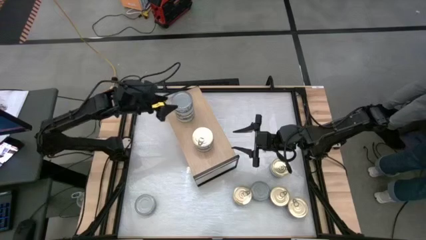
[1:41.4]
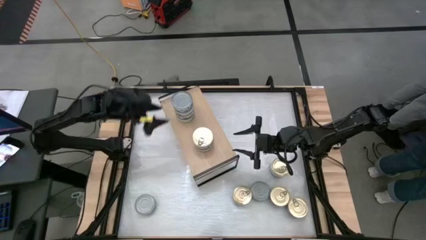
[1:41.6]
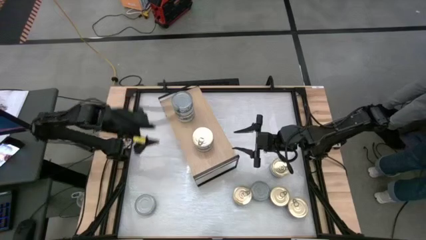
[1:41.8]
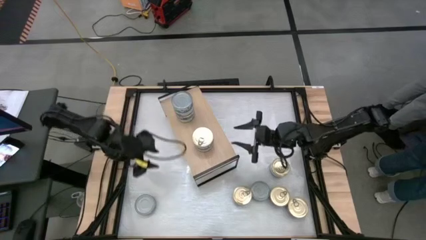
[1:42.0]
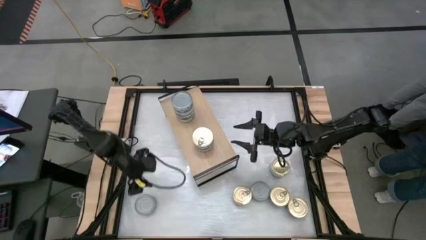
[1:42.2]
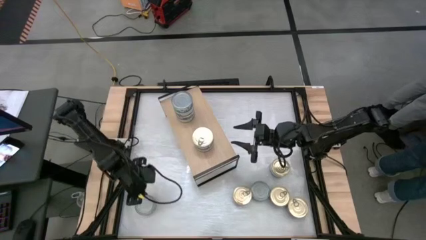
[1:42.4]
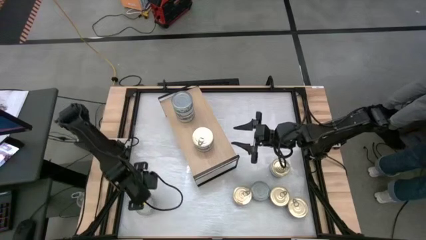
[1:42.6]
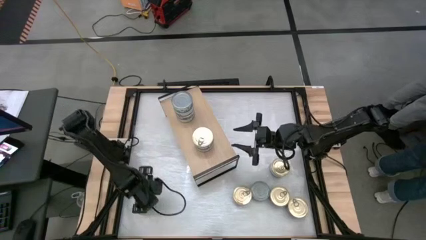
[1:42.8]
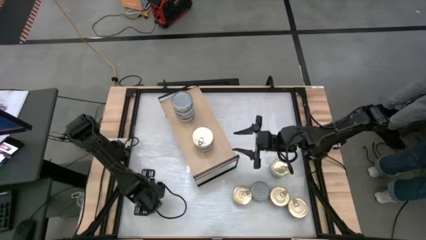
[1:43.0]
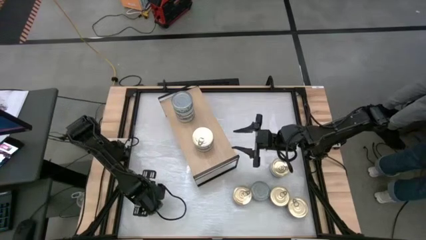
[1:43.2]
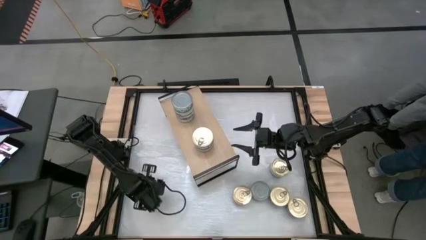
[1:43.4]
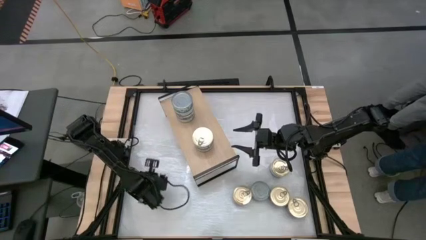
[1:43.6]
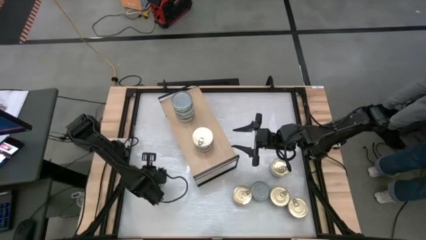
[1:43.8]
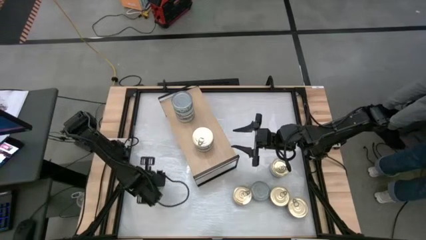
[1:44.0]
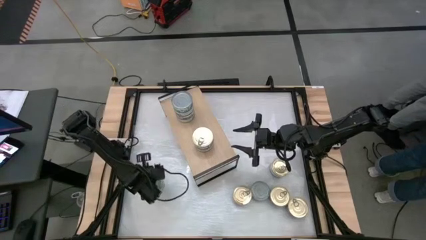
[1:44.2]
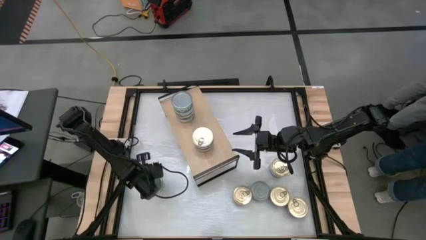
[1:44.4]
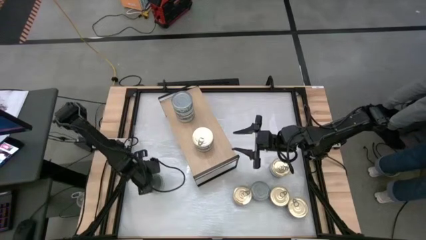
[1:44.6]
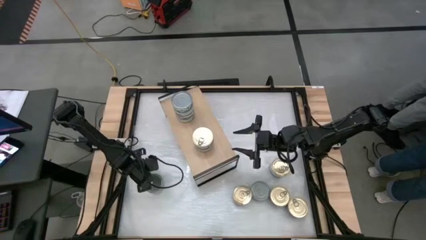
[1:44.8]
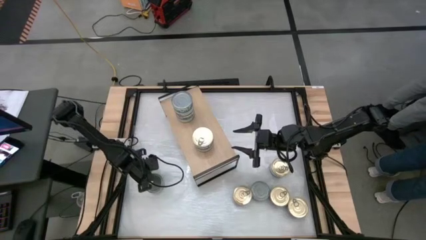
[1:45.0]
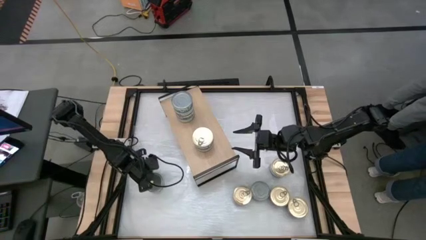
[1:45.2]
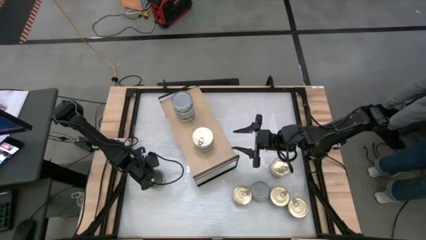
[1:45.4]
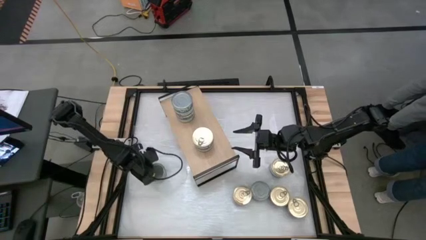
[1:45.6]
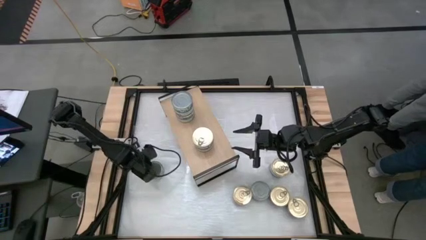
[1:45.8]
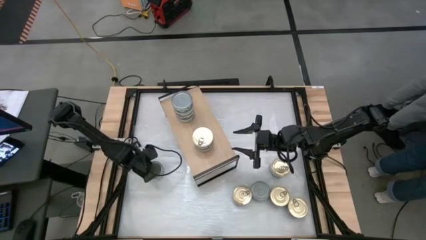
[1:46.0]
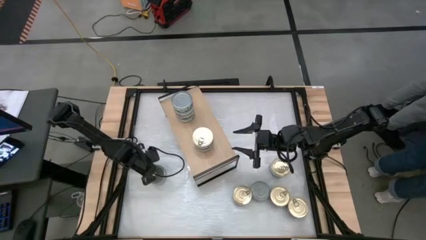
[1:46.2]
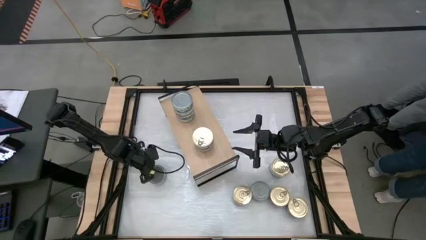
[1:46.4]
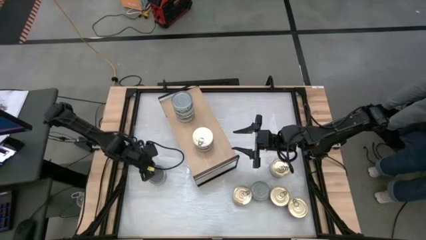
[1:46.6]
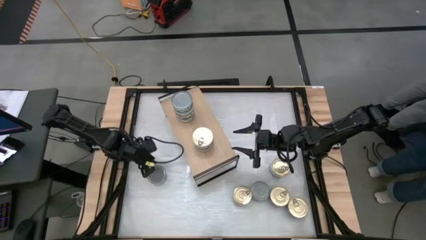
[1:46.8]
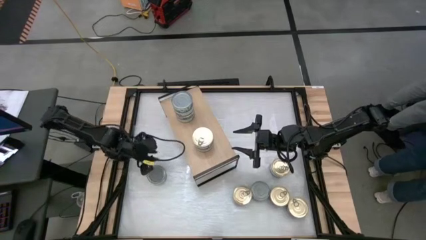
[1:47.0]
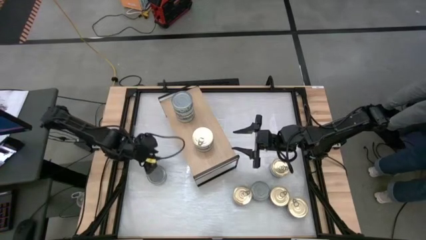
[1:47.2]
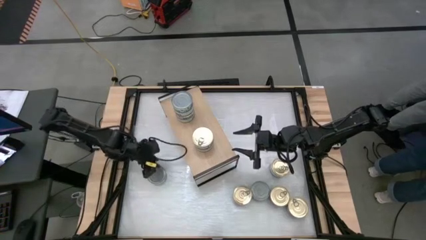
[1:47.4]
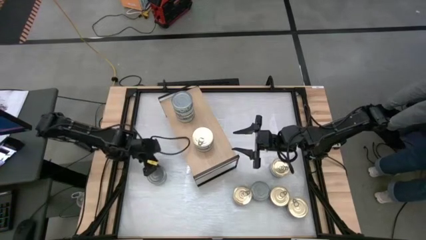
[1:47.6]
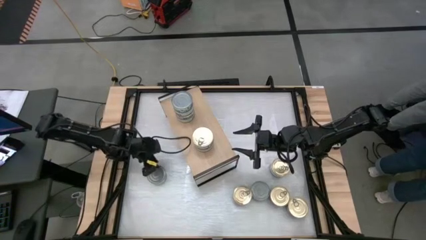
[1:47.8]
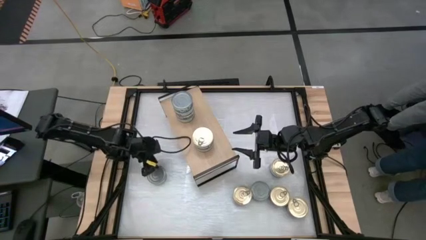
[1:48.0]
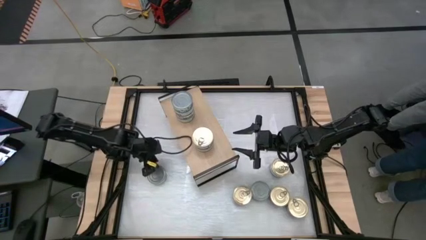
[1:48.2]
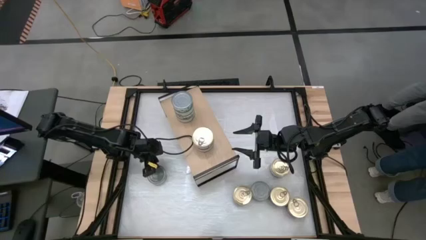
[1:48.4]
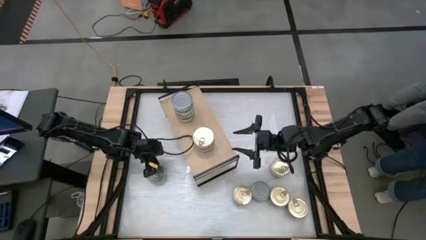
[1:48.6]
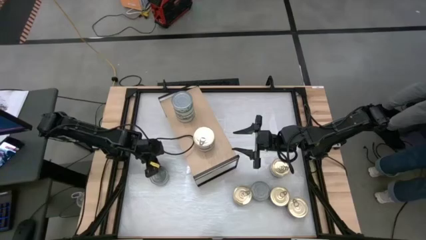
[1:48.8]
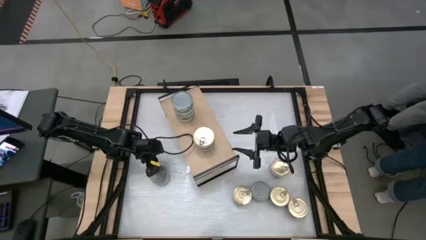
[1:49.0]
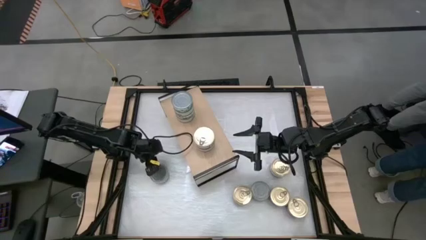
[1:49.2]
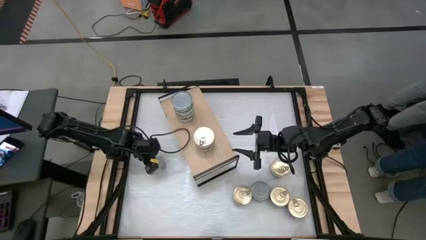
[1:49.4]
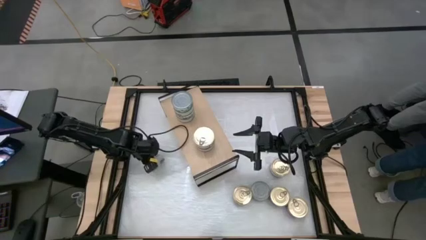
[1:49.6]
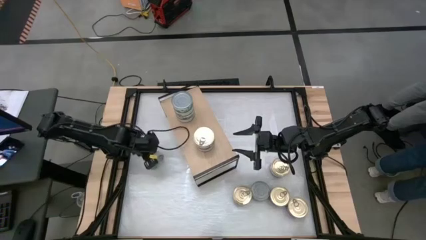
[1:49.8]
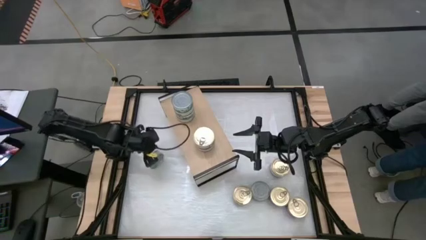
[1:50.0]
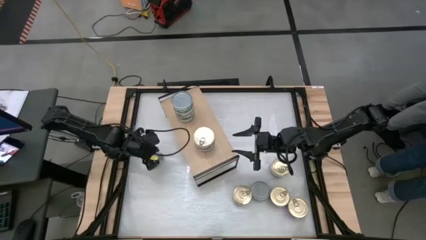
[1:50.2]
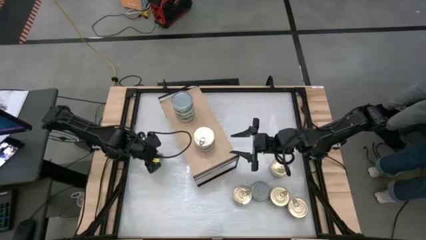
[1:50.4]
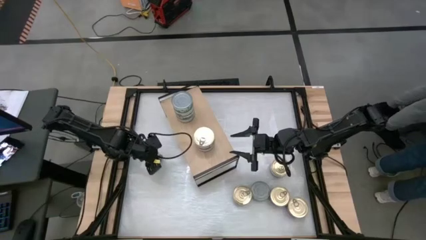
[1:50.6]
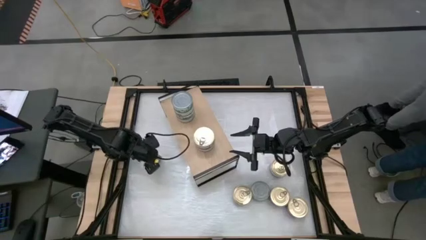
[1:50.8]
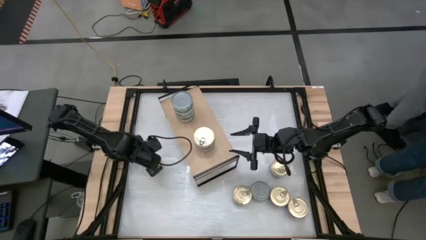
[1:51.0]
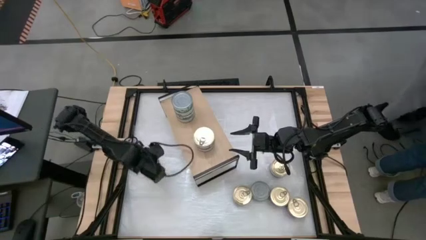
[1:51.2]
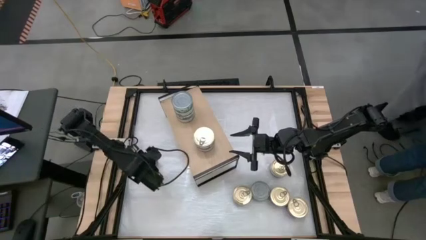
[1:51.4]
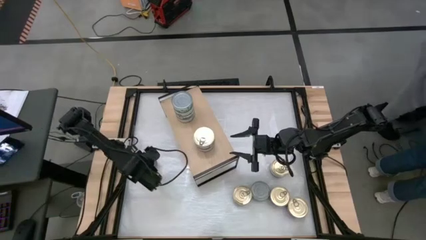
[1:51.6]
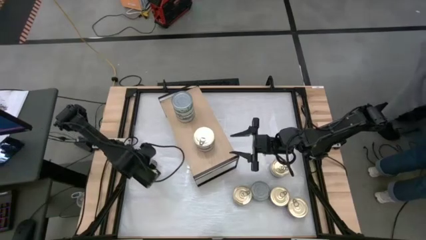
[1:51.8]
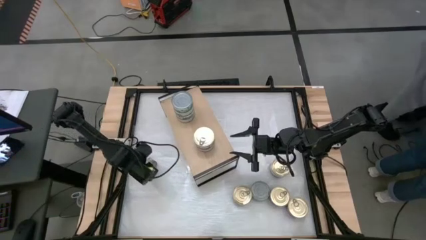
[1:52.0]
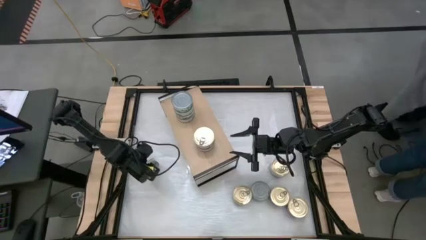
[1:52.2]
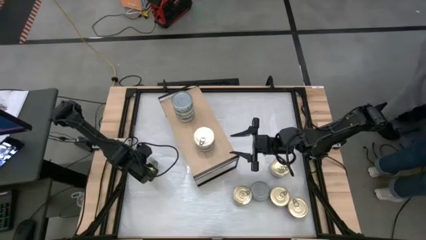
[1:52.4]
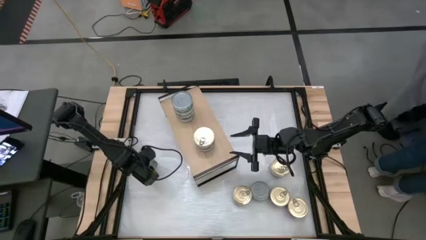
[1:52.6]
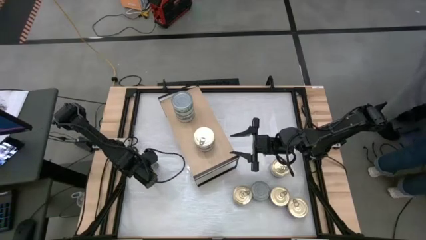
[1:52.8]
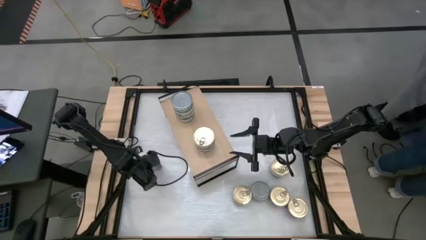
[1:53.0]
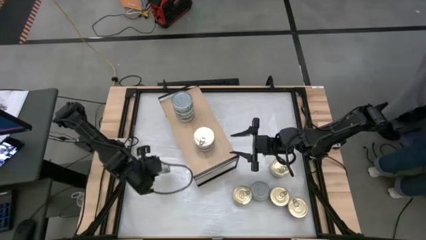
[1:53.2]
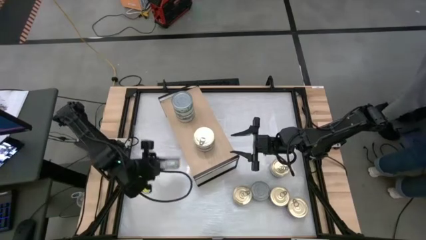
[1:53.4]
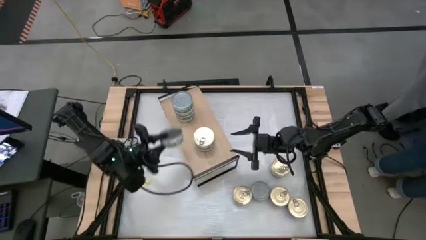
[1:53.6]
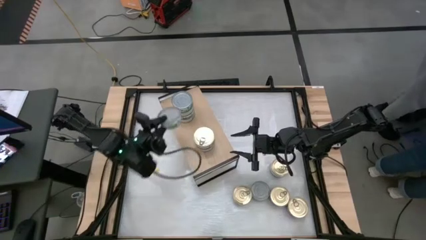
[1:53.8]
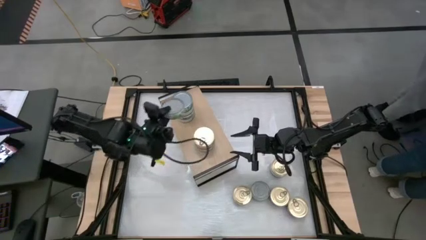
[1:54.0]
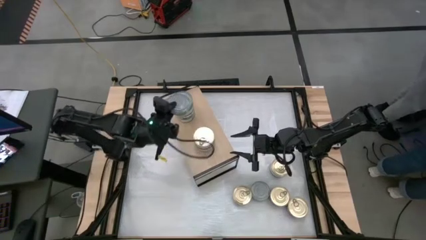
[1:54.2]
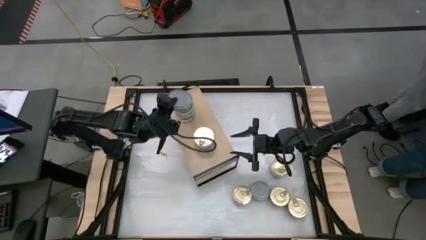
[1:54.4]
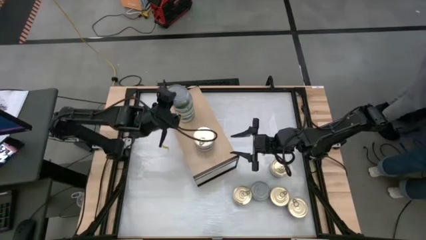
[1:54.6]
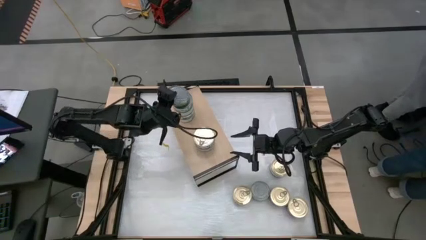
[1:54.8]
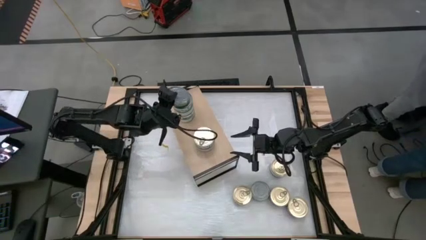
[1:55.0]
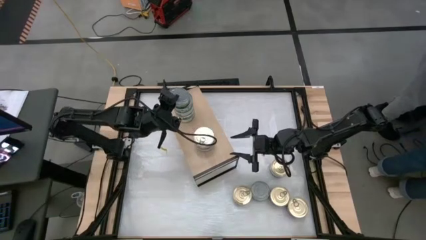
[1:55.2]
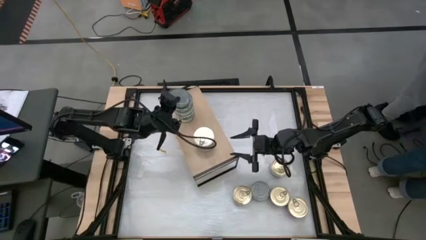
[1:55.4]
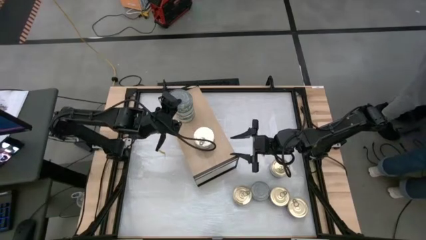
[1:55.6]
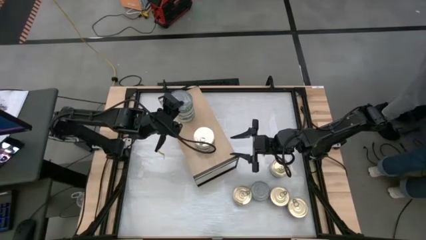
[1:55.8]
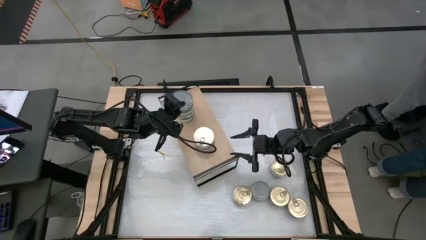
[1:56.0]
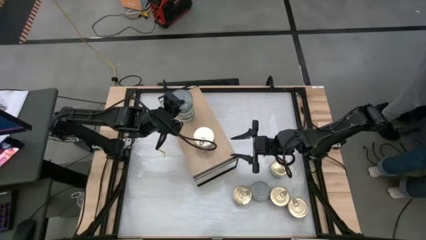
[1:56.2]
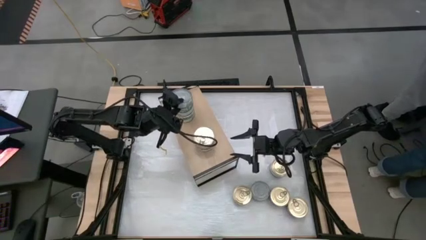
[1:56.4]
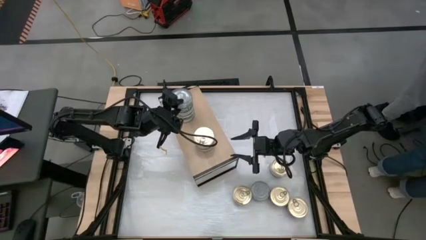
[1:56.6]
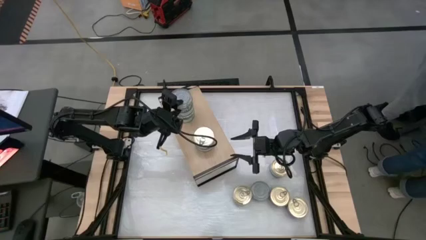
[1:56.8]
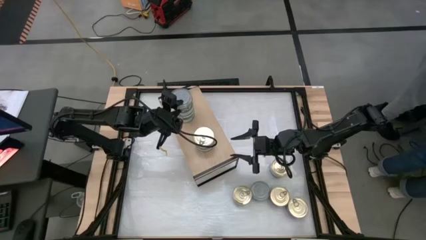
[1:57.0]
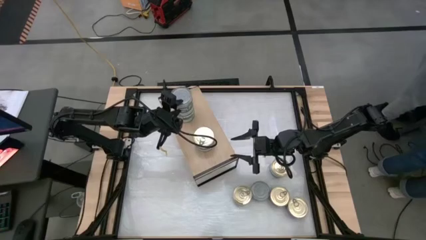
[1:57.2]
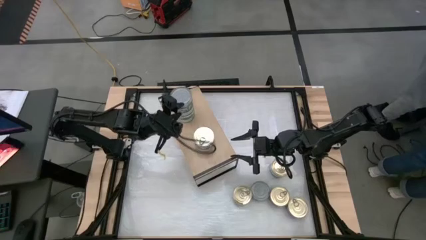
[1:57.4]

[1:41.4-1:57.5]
Task: Stack canned seafood by type on shelf
Stack the green tuna can on top of the other green tuna can on the shelf
